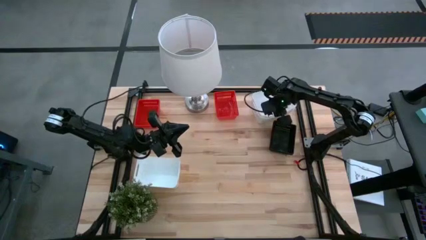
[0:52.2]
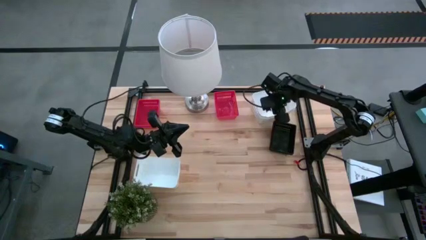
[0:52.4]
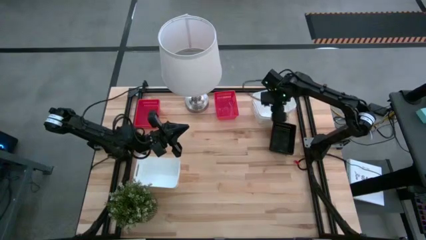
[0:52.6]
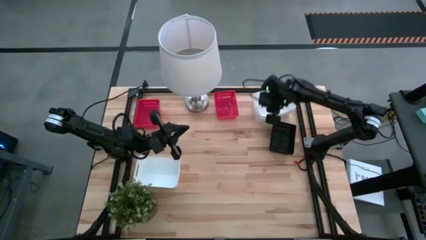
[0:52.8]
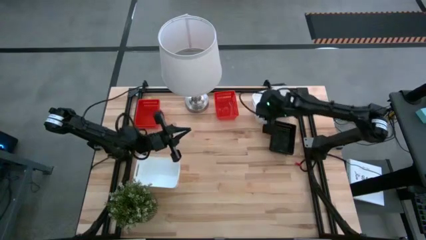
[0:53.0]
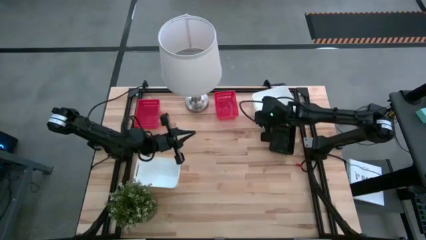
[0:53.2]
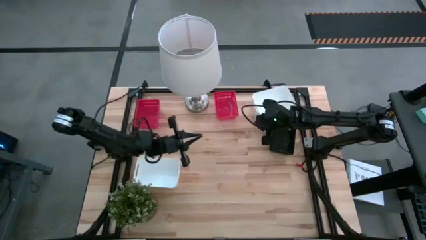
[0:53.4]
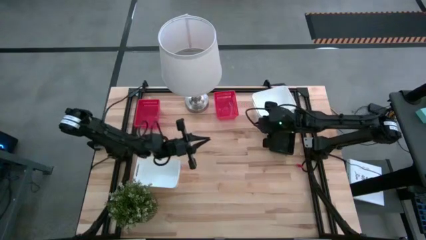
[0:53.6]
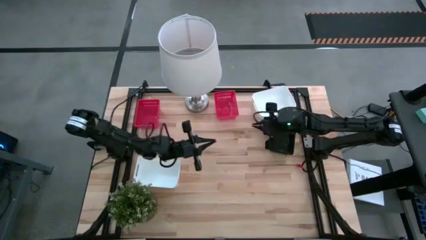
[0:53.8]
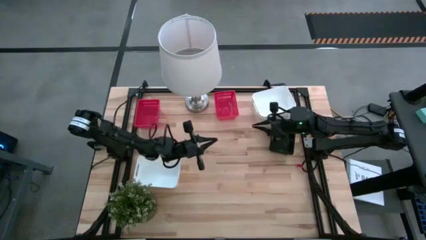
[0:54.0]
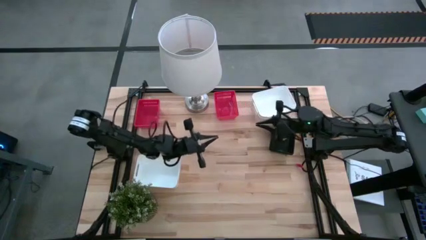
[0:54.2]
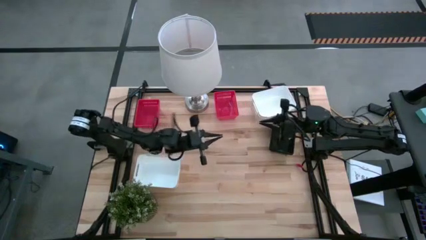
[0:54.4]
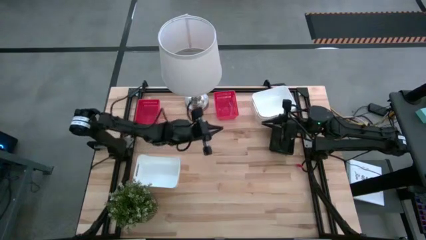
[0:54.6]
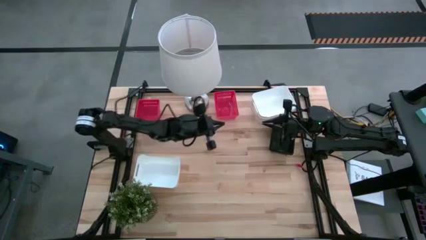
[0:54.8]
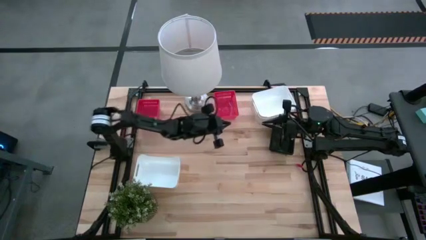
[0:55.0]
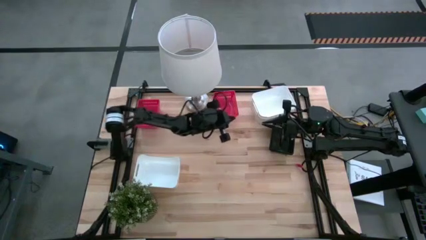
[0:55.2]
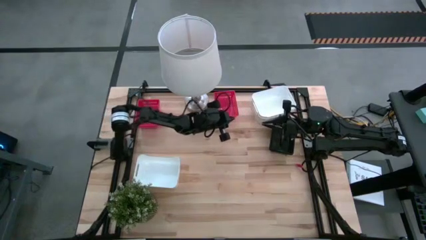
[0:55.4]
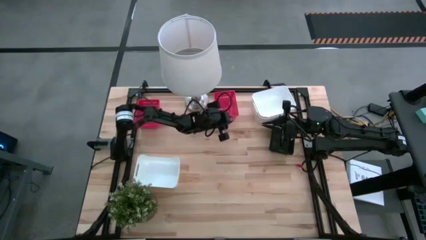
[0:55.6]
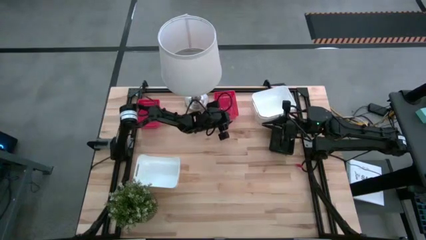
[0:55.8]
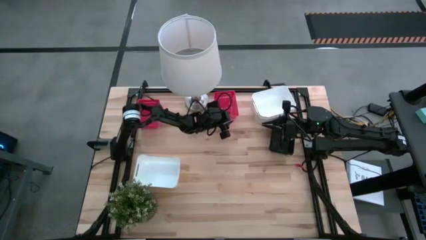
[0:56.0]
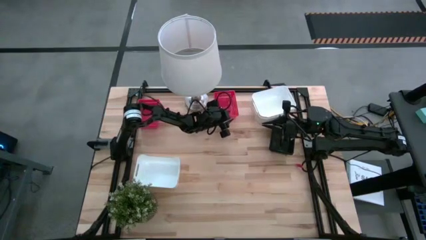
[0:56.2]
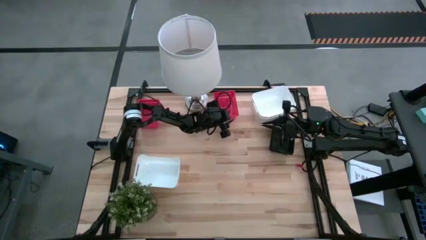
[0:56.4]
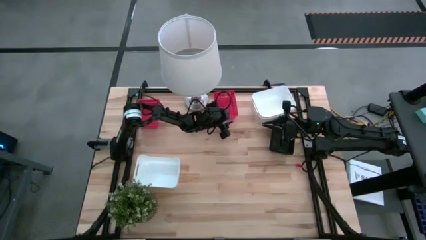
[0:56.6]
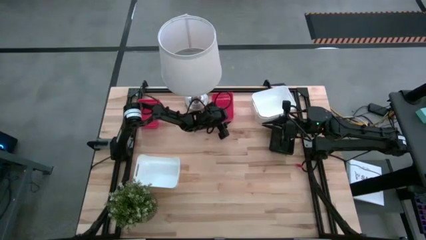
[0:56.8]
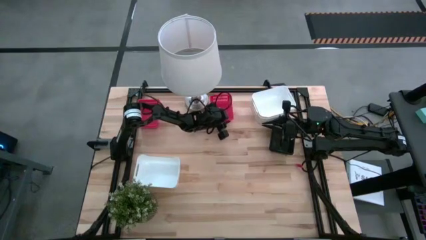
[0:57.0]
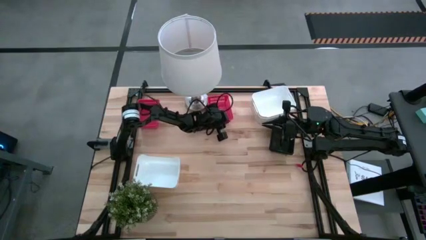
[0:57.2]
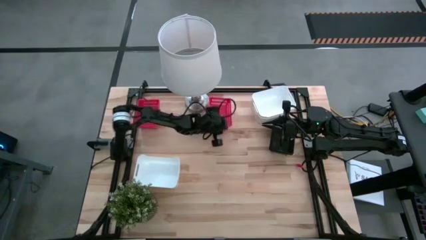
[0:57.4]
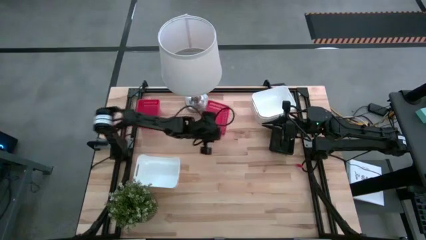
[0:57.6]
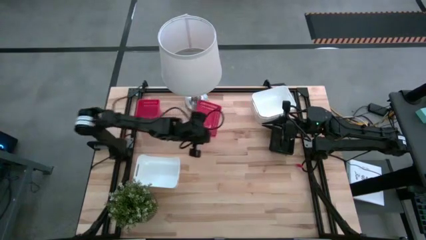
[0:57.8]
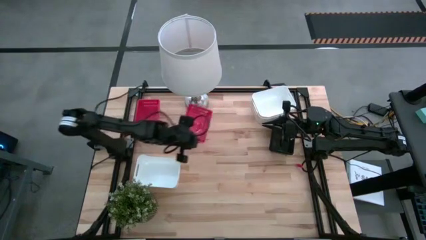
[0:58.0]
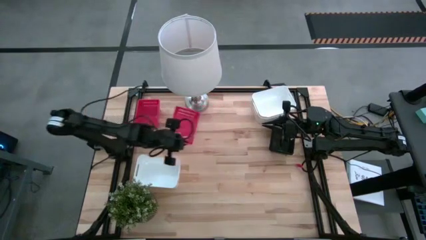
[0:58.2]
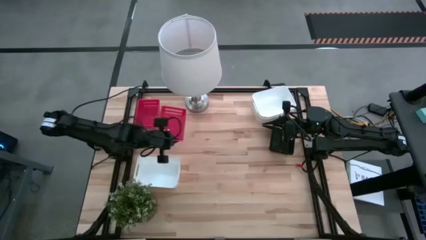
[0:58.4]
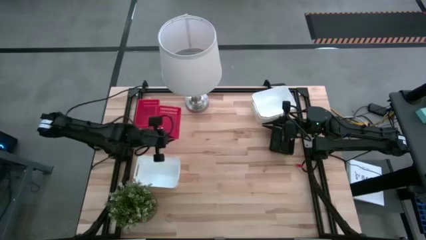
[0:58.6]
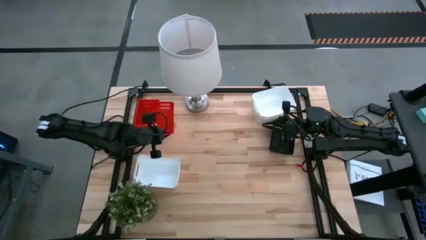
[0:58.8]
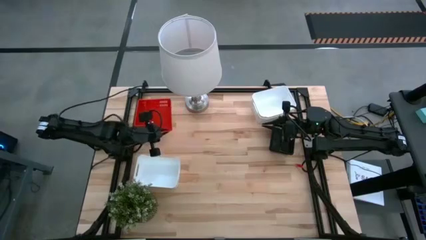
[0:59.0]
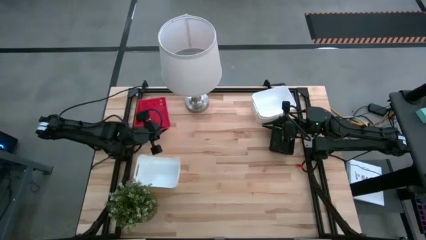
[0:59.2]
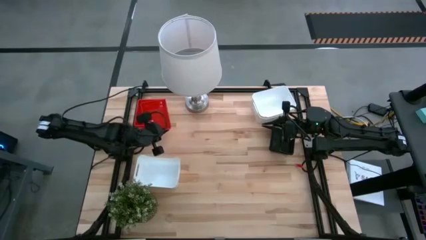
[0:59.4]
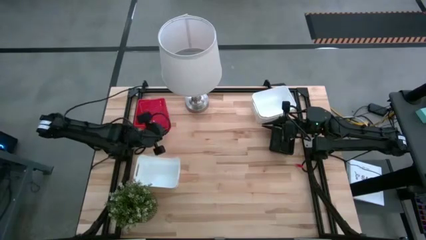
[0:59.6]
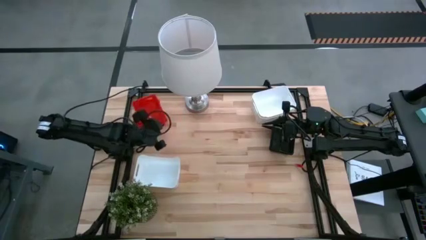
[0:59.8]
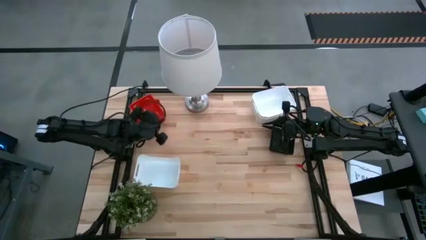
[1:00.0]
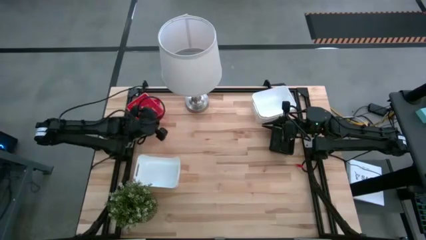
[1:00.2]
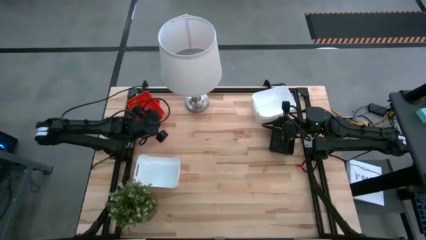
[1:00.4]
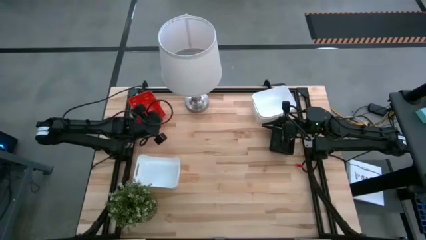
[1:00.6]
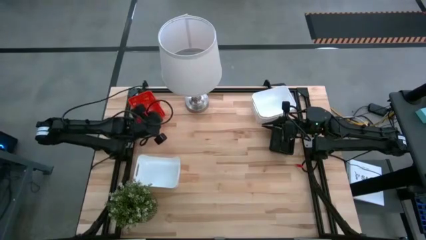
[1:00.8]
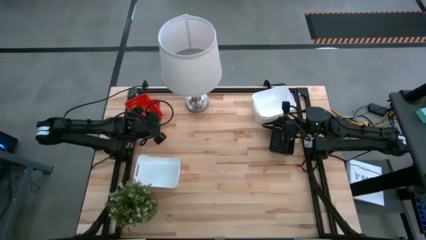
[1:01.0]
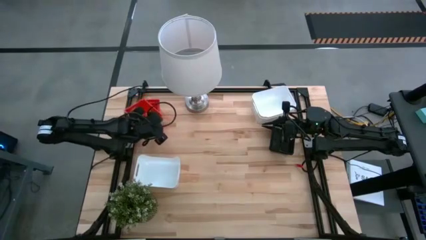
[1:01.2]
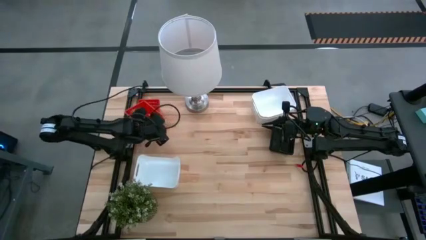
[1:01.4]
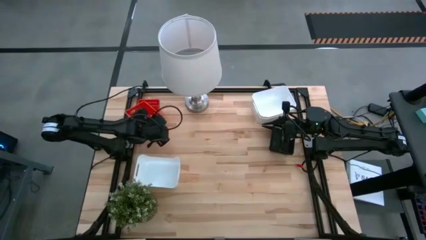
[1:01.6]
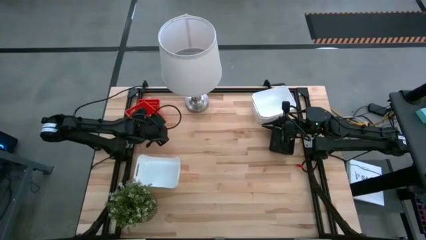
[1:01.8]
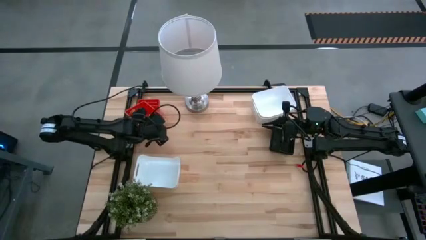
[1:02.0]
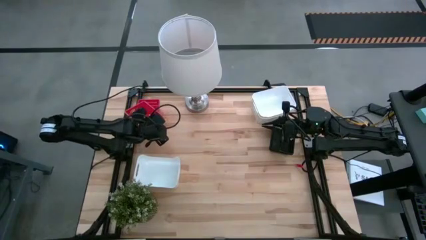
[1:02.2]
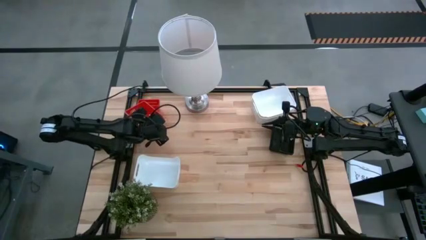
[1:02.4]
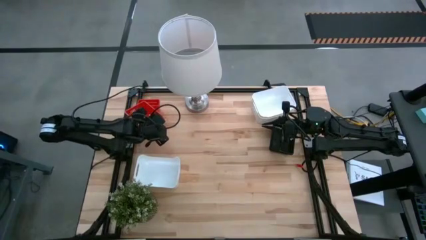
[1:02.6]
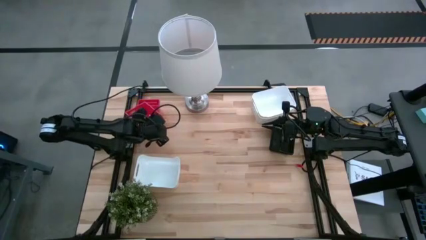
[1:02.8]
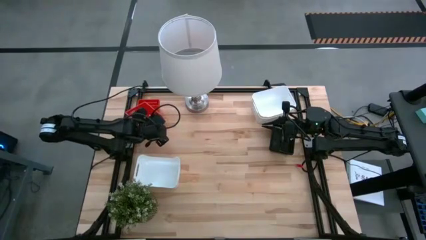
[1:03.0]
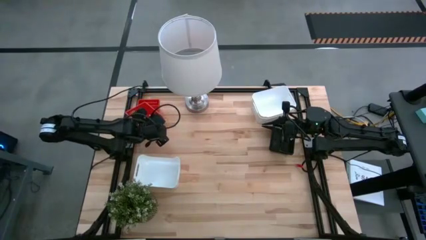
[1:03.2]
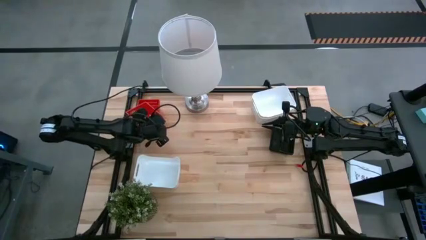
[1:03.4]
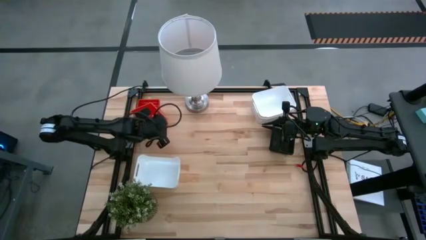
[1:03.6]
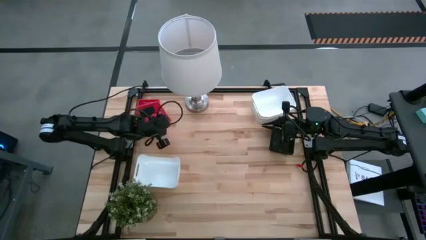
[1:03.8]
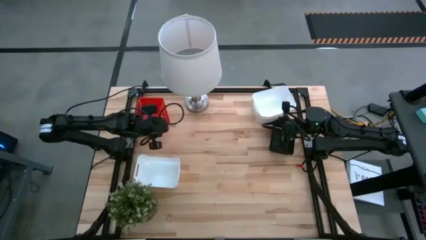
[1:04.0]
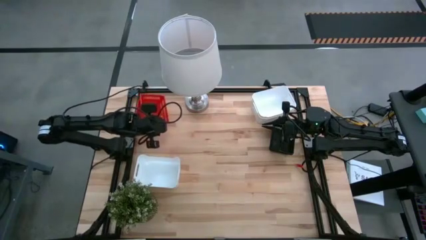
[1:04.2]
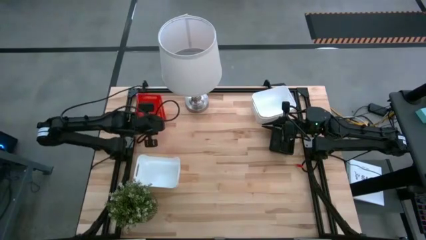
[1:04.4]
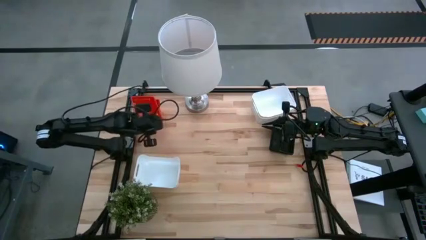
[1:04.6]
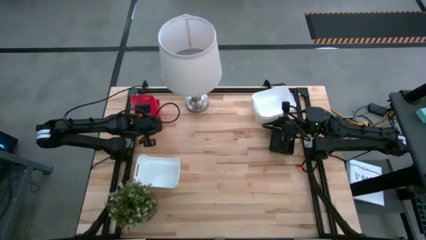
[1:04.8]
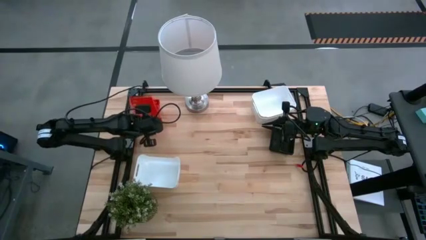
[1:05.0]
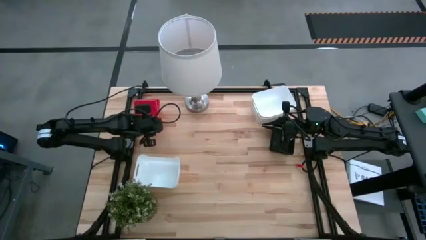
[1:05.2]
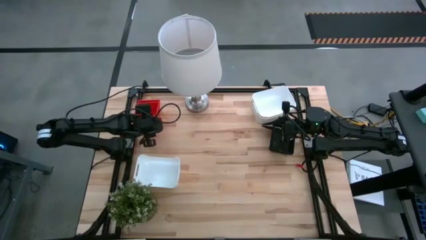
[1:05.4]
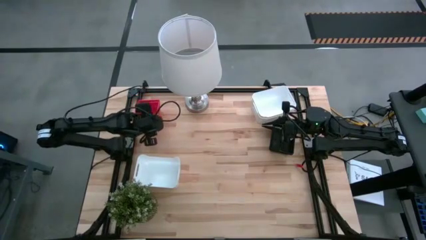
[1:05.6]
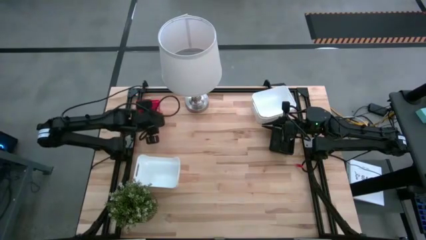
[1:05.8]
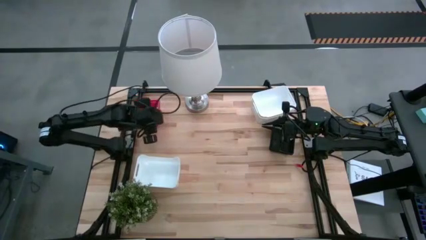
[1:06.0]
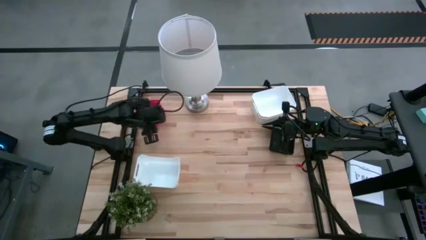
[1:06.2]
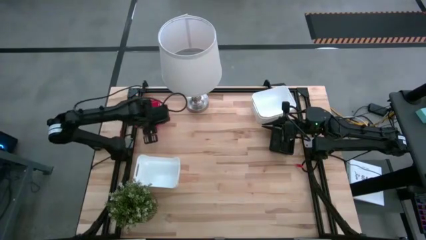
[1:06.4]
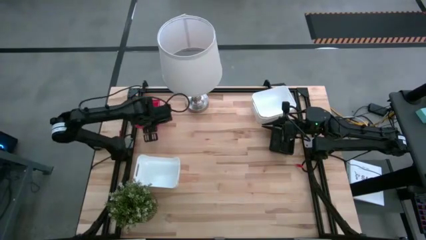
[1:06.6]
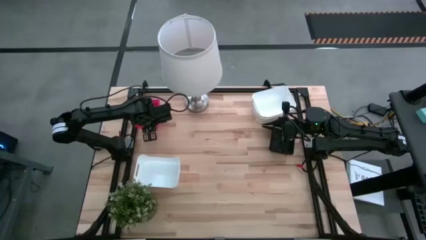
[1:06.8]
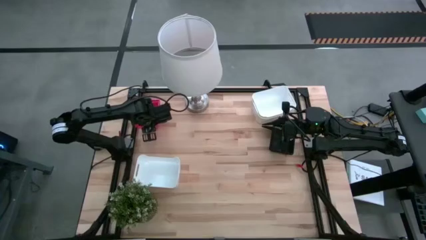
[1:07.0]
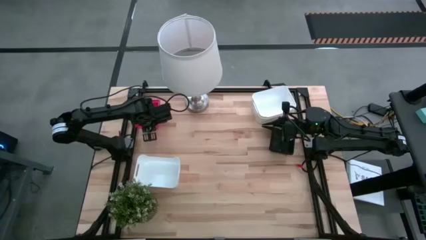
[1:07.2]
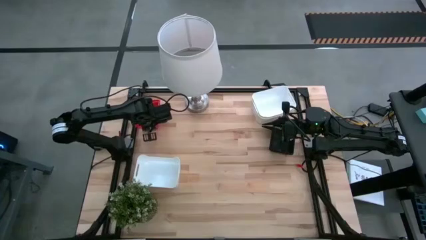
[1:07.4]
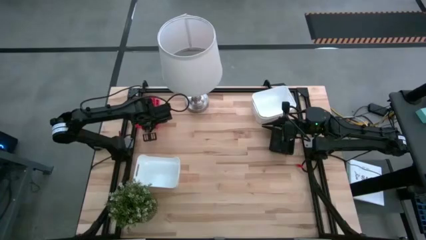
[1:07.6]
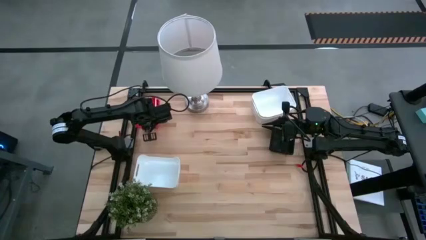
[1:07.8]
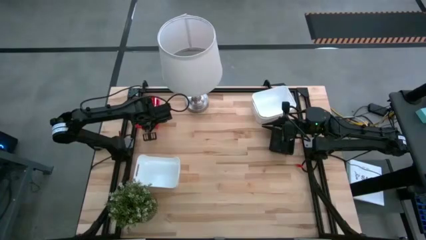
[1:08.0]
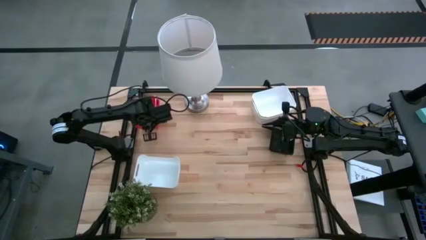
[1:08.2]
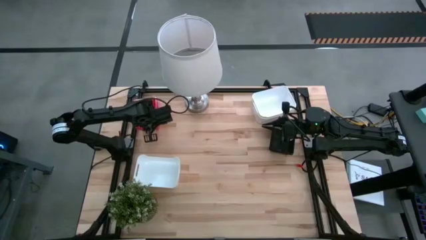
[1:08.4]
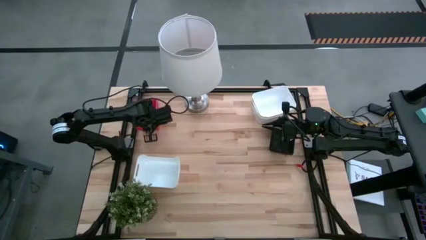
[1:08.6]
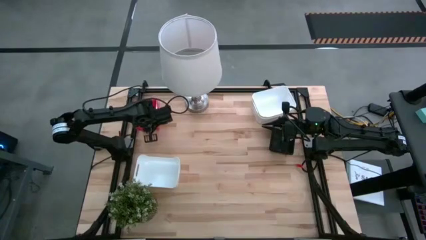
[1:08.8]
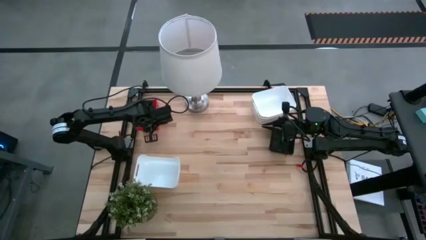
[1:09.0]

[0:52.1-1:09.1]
Stack the right and red bin on top of the stacked red bins
